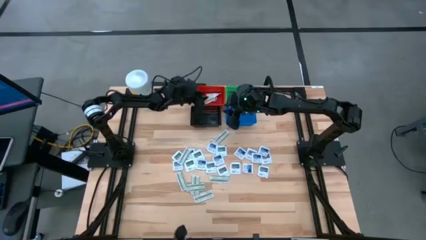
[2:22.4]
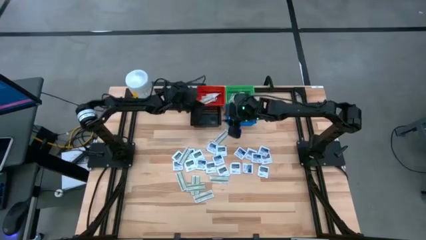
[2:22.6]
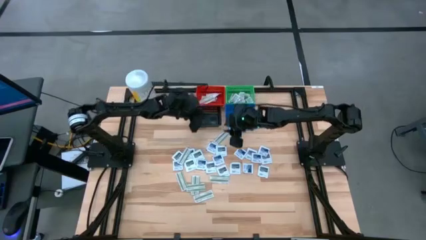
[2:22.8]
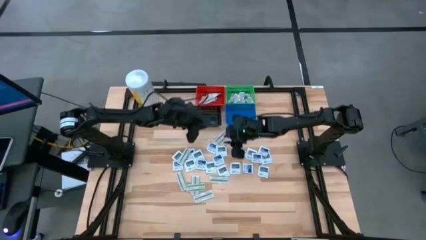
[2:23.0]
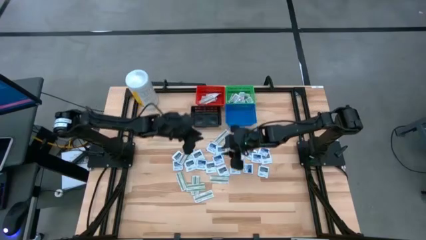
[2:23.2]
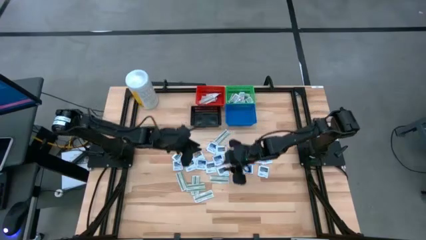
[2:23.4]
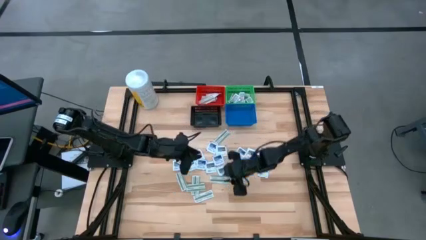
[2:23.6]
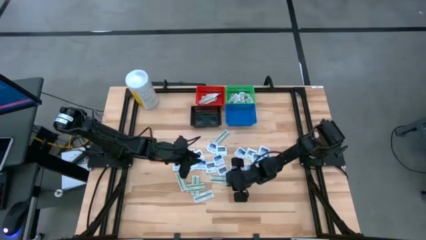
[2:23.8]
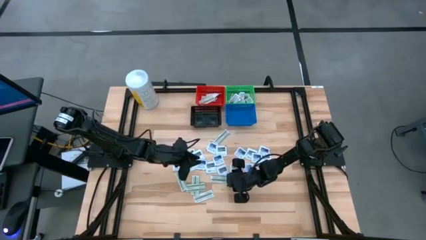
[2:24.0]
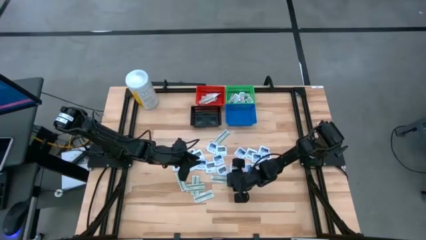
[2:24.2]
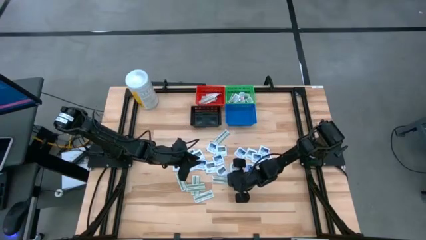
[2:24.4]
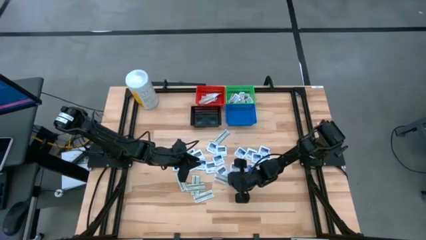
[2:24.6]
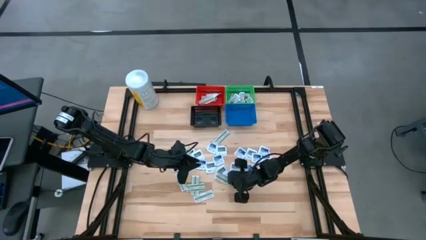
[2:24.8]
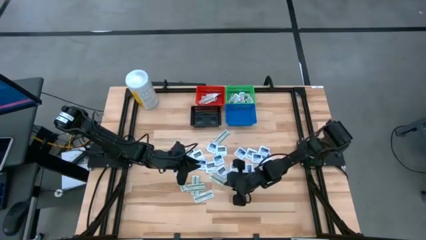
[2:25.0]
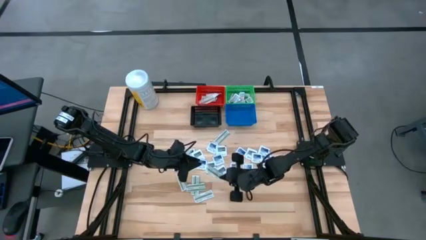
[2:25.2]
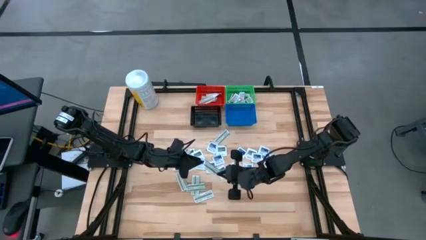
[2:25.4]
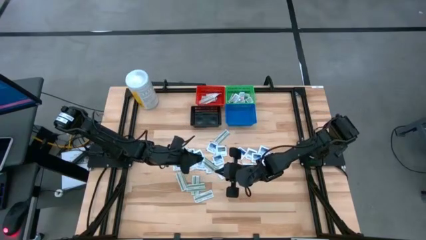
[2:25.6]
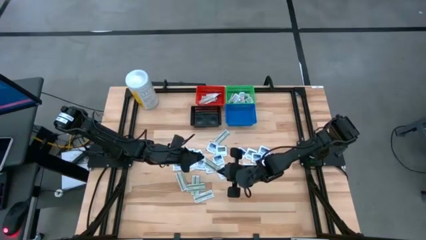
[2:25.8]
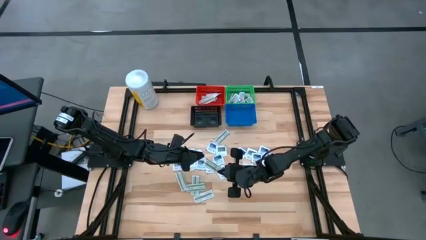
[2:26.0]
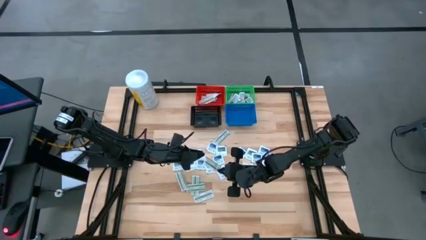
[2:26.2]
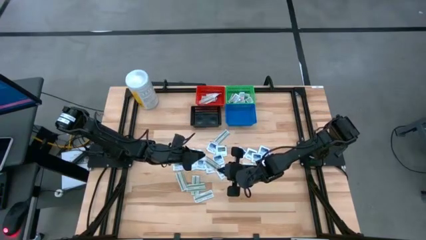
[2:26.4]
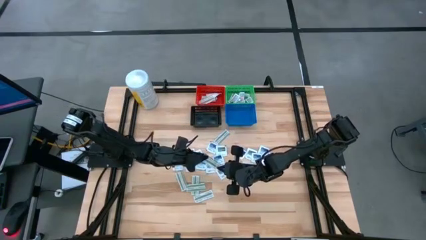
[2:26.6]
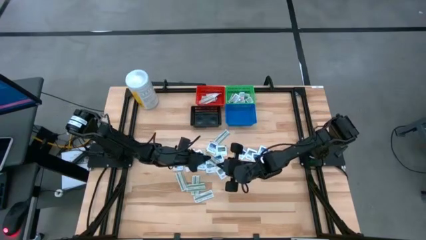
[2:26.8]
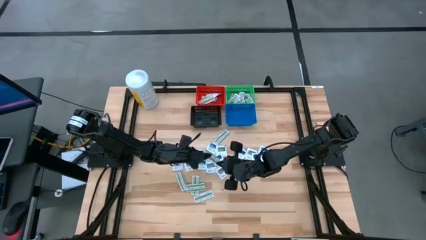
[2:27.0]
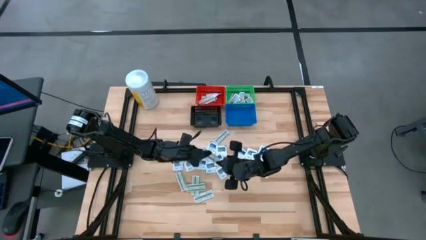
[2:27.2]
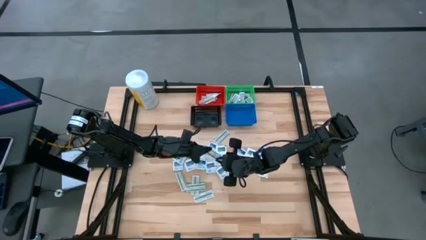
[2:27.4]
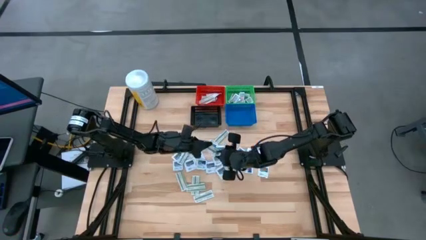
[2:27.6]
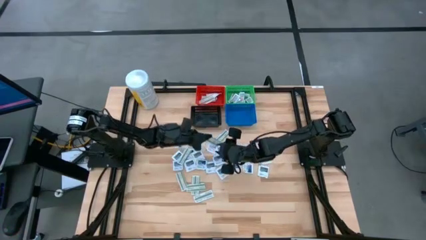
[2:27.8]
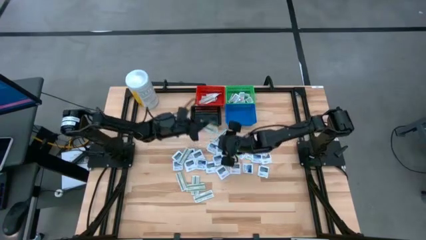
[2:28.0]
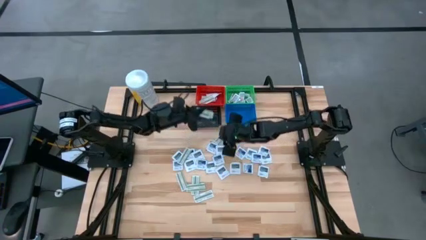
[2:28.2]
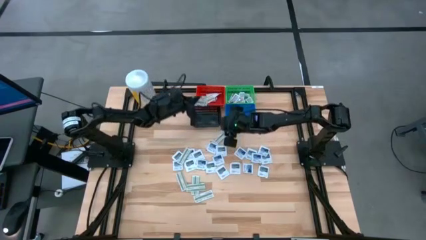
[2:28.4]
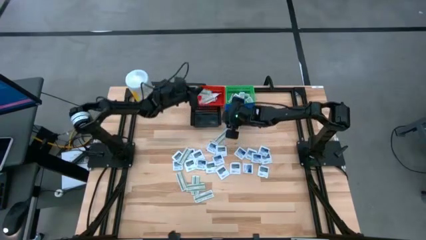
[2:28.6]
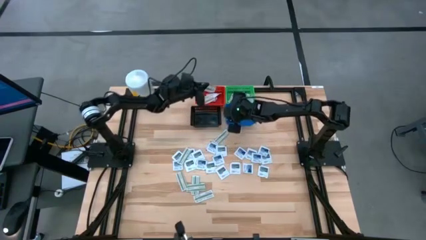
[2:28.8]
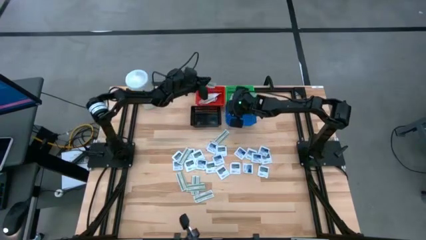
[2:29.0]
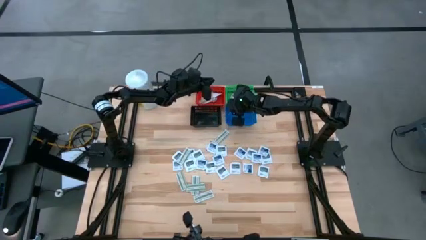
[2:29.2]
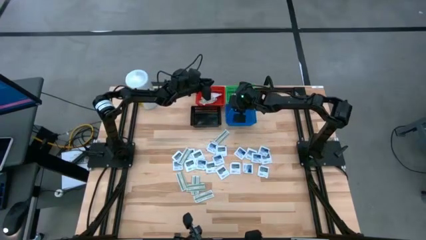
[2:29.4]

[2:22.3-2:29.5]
Task: Pick & Place First Aid Supplies
Put the bandage into the red basket

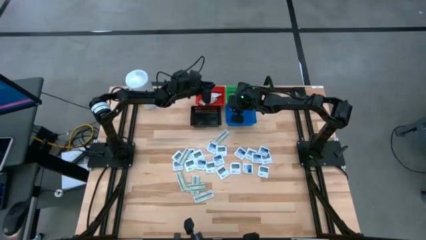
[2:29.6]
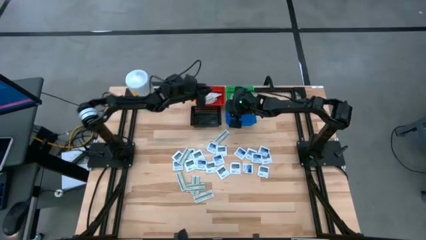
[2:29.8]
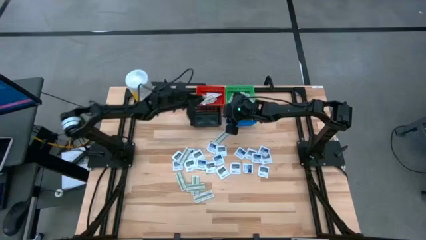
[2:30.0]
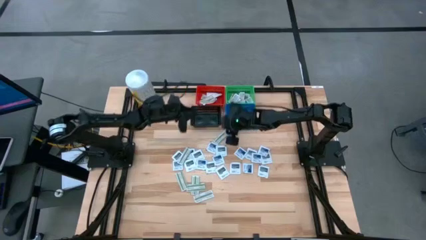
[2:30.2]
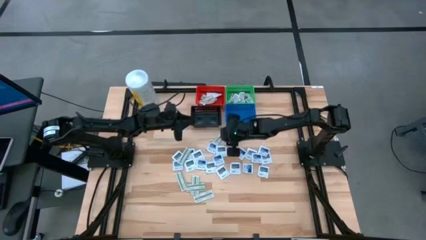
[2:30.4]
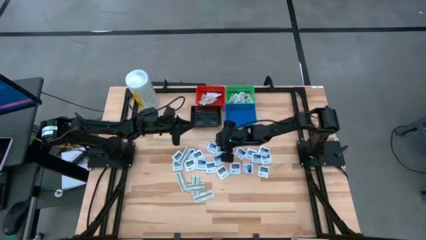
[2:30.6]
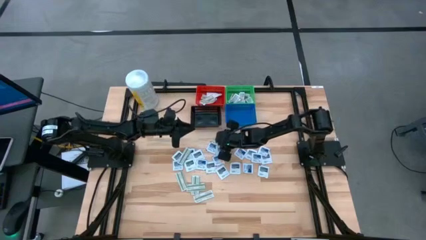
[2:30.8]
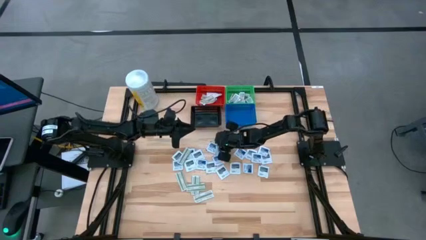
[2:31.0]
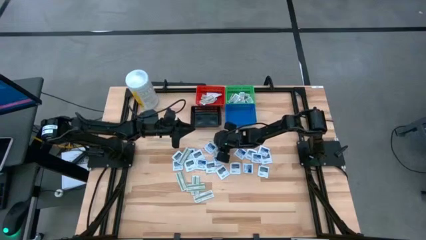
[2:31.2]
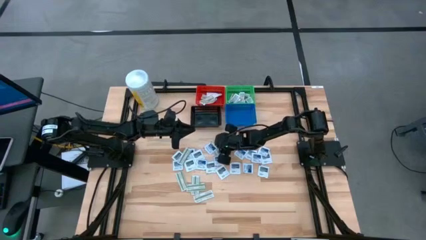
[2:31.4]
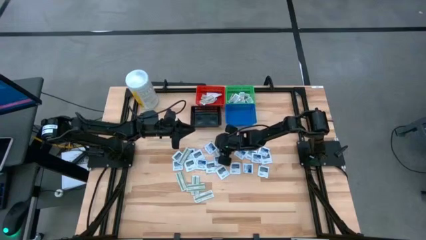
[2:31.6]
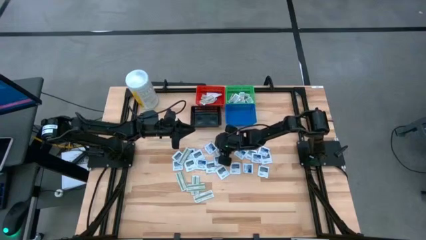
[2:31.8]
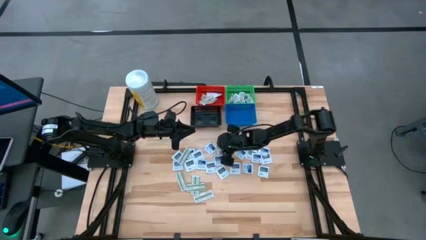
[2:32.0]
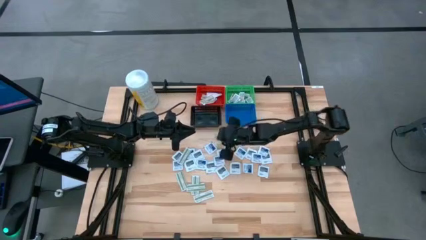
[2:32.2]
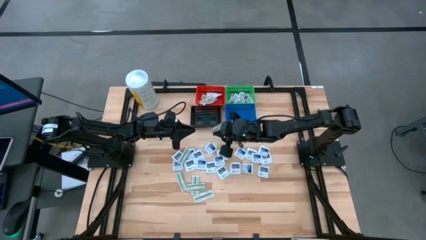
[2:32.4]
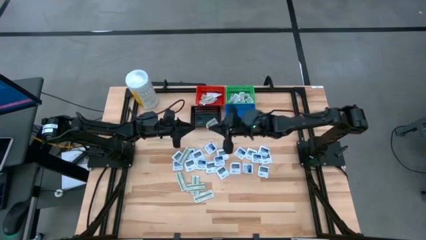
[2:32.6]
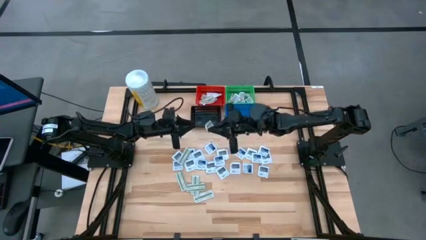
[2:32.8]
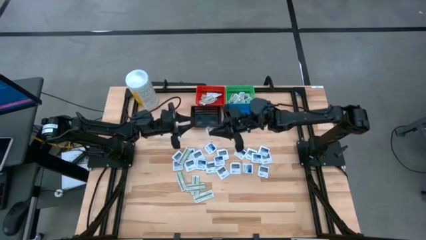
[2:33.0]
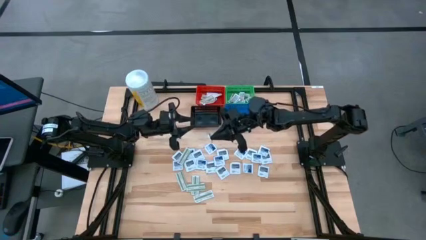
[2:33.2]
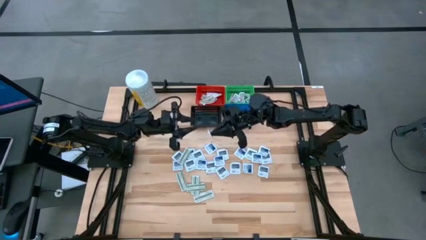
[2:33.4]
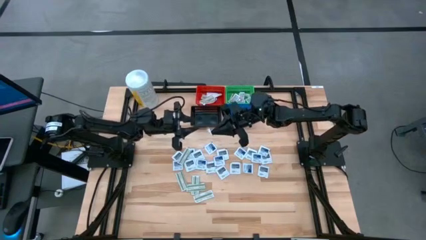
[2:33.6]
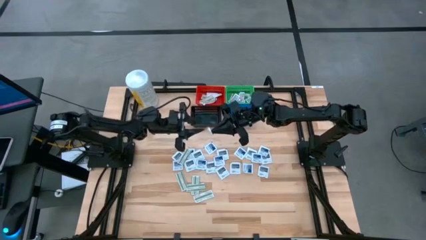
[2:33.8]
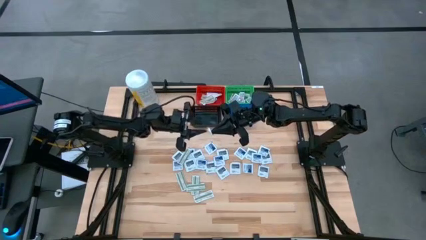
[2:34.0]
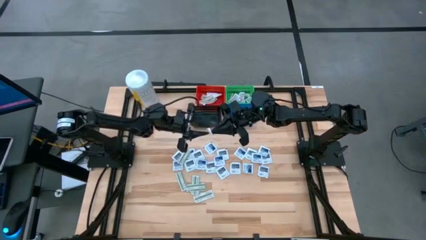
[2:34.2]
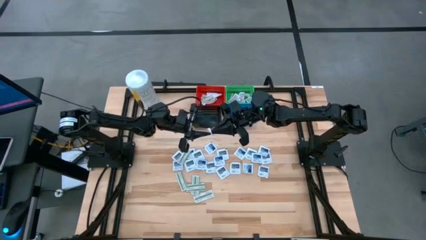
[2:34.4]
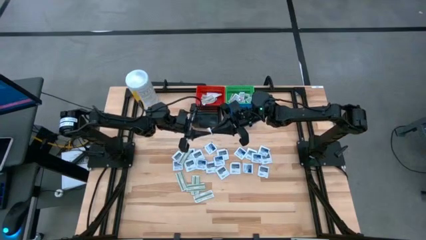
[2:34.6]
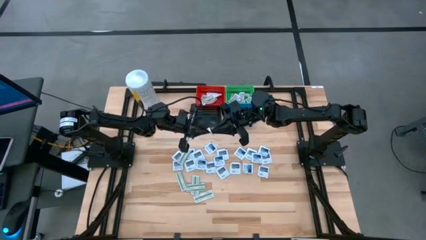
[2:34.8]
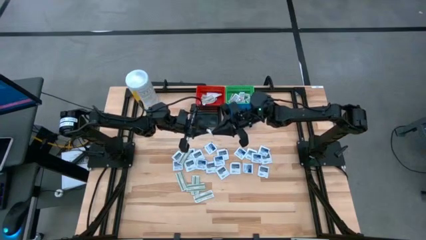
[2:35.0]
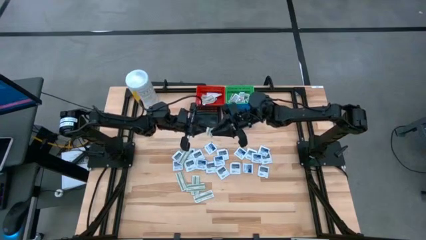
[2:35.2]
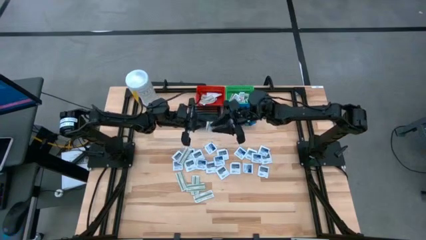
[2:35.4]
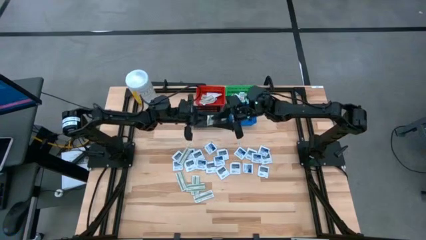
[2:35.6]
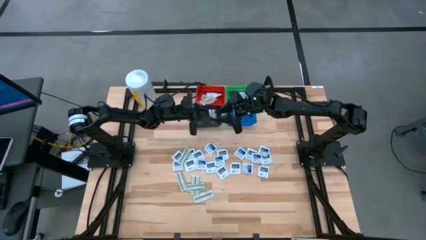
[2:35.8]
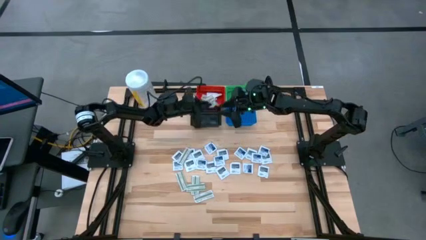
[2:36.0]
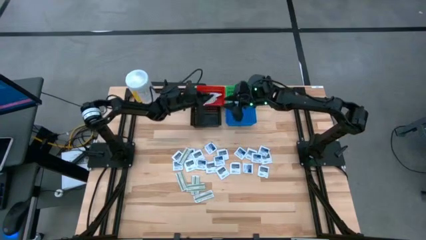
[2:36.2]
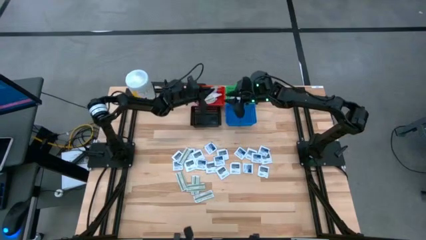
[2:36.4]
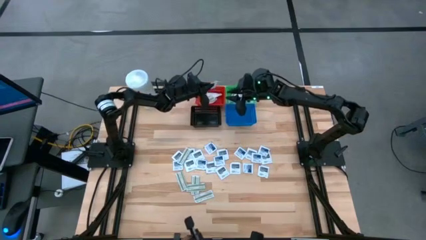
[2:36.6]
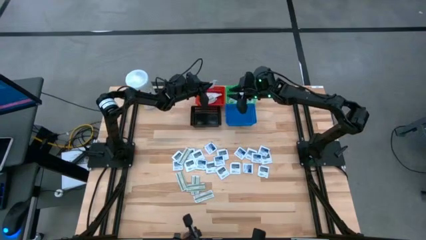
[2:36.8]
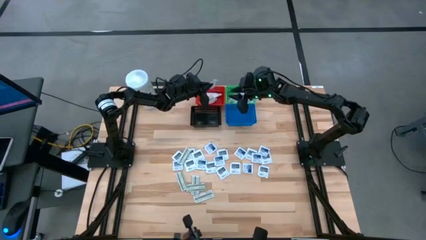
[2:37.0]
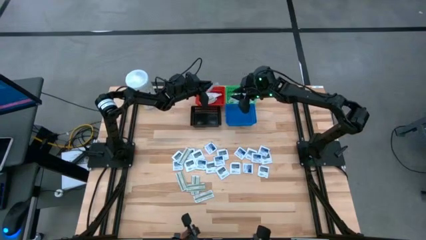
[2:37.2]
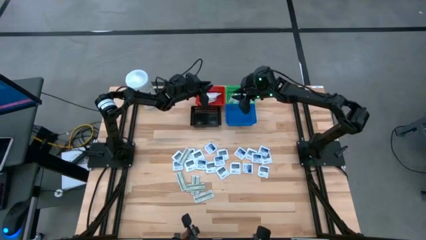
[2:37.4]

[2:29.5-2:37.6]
Put the bandage into the red basket

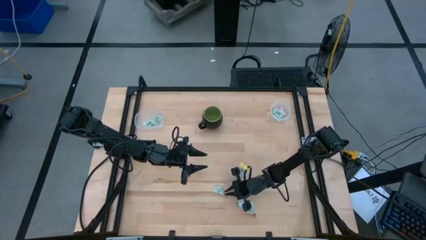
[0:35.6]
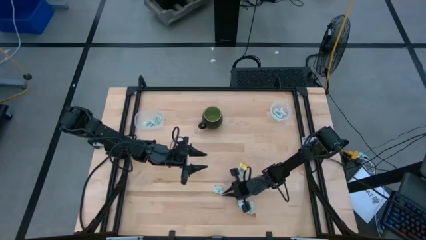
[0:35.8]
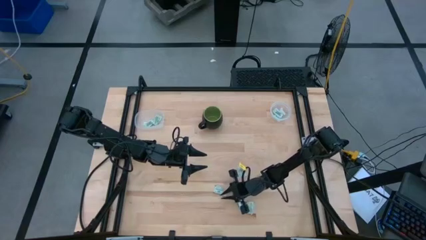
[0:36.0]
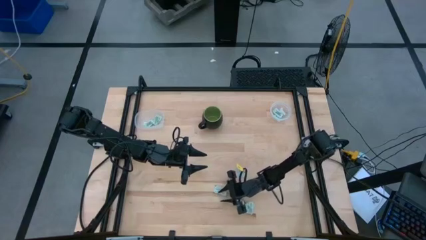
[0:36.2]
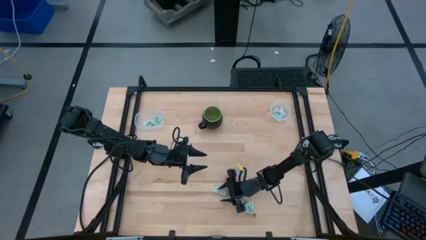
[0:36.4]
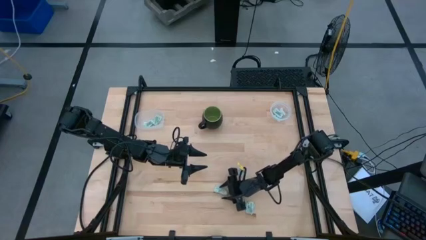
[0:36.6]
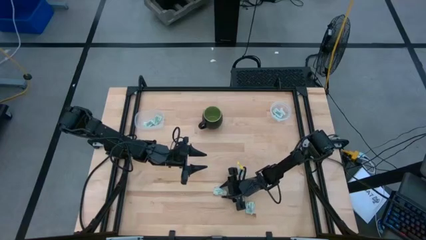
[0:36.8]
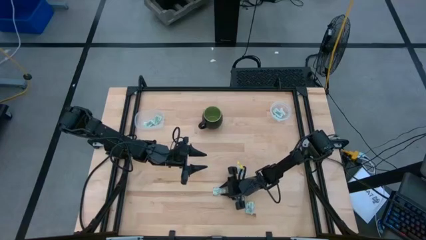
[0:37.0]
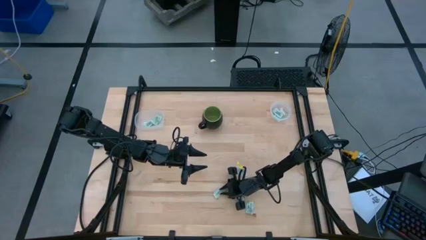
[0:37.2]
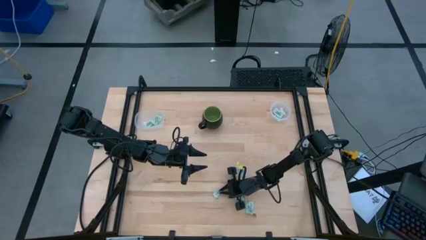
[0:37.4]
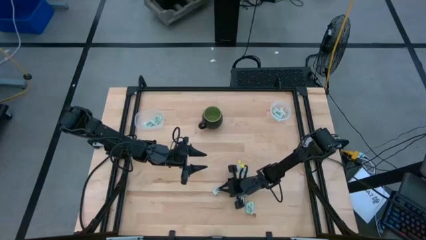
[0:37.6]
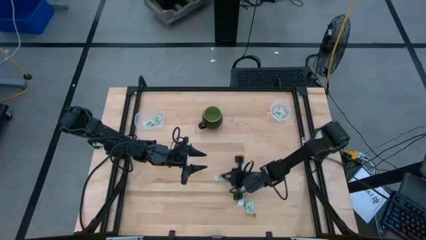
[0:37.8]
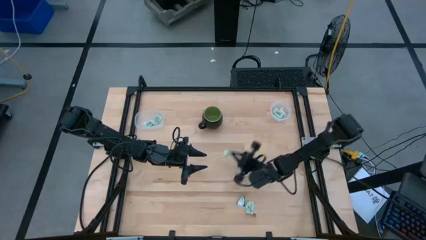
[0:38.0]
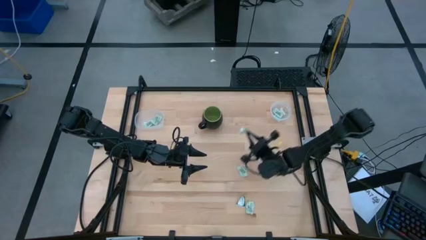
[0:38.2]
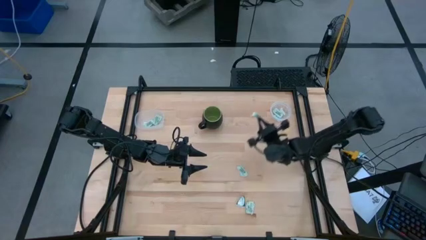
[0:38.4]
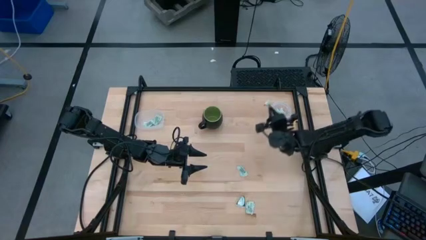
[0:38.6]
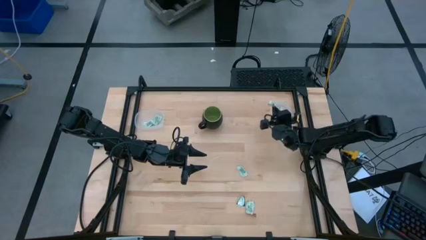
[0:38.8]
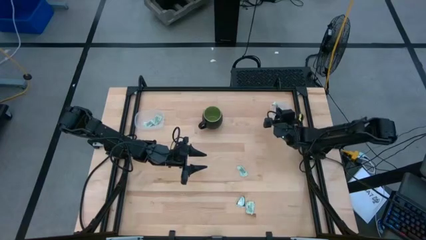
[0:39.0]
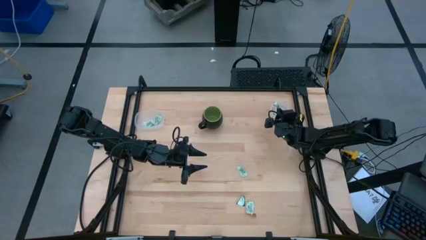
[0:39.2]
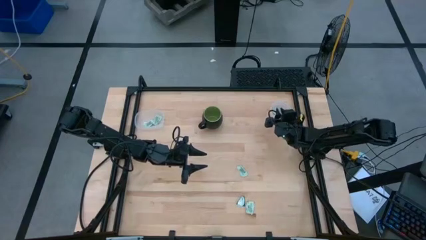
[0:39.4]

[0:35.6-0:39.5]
Task: Pick and place items into bin
Put the white stevia packet into the right transparent bin
